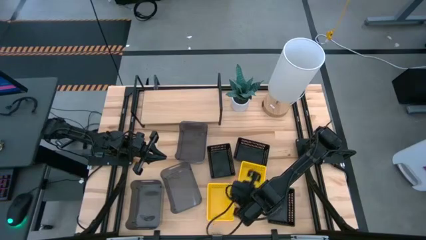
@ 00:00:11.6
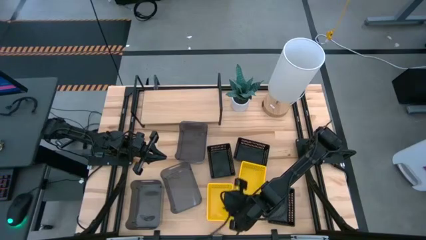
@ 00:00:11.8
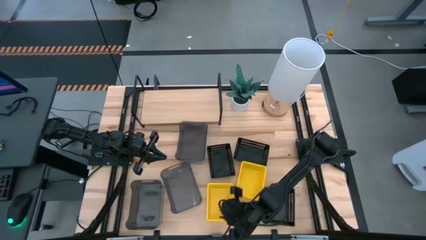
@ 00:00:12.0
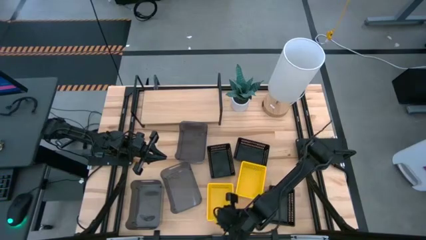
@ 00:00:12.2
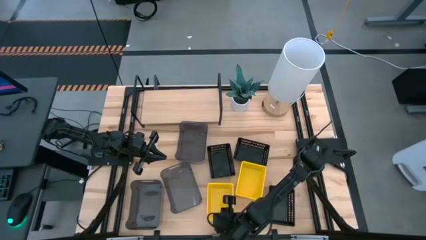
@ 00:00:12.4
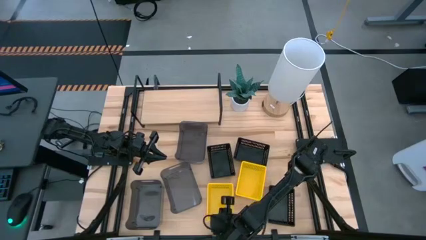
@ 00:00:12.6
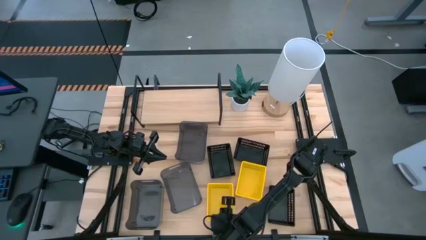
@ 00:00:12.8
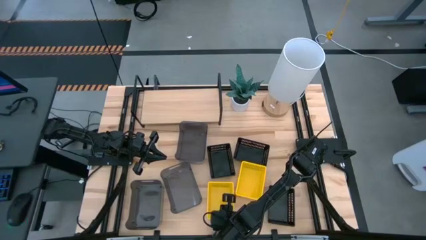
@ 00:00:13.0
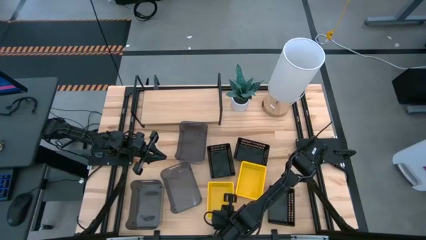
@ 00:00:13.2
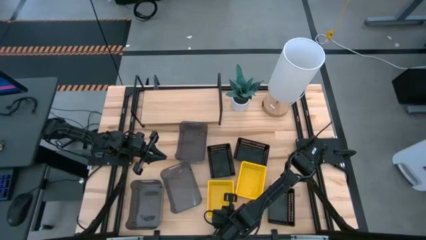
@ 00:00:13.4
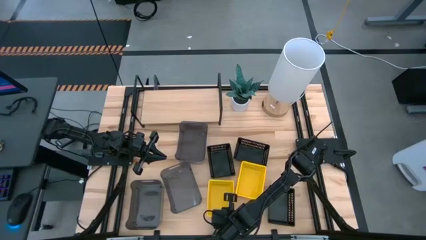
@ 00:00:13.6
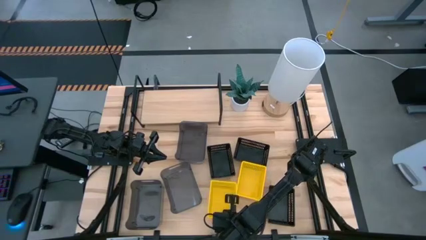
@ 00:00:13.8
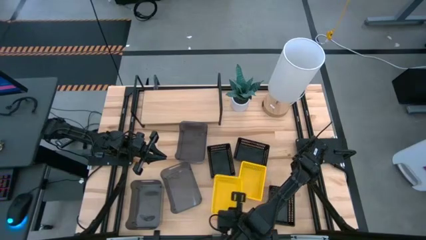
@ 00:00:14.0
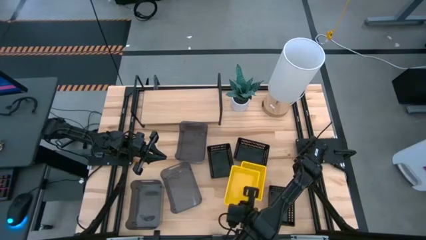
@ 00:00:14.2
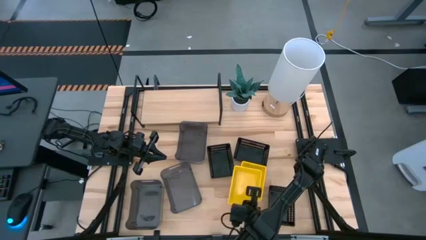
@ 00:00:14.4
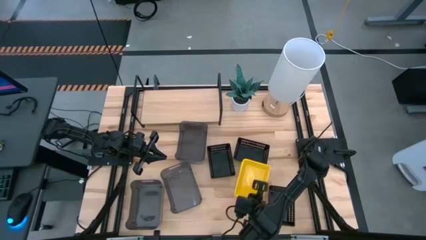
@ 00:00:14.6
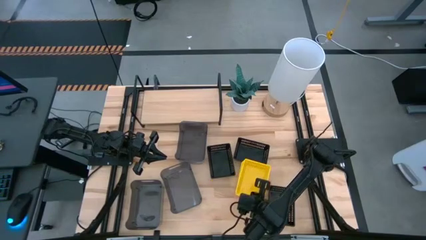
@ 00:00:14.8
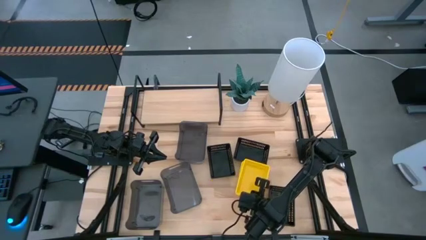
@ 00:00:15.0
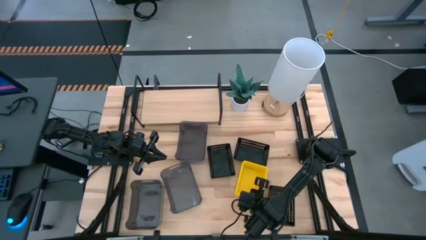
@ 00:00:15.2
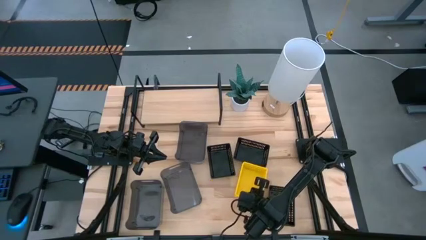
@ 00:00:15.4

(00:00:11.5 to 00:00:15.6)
Task: Stack baskets on shelf by color
Stack the left yellow bin on top of the right yellow bin

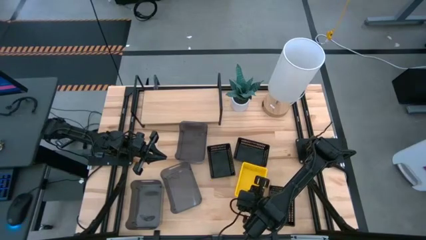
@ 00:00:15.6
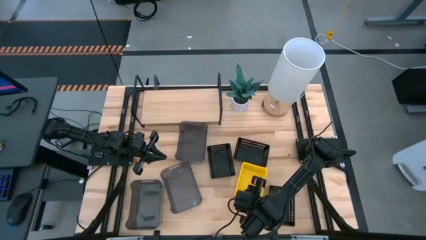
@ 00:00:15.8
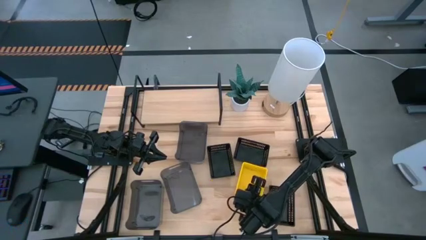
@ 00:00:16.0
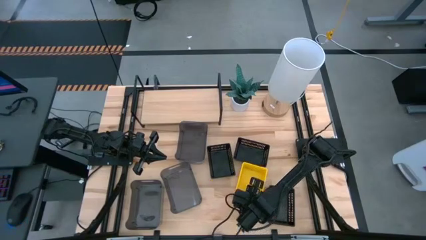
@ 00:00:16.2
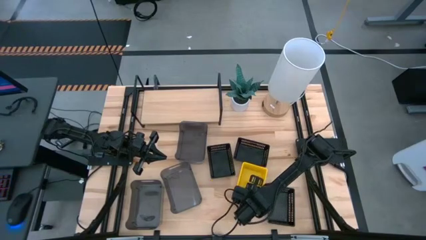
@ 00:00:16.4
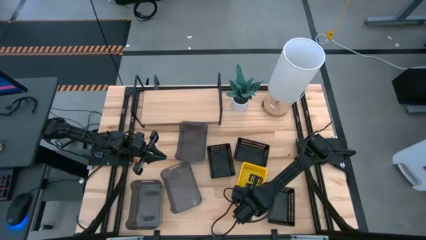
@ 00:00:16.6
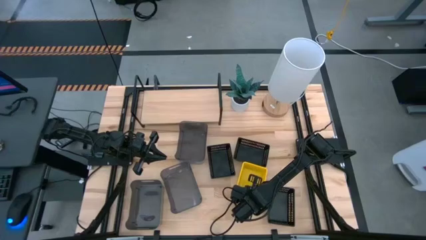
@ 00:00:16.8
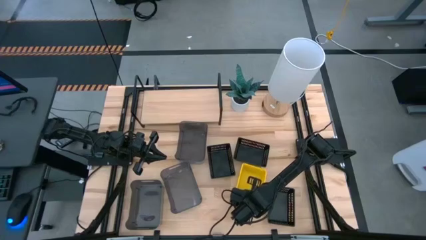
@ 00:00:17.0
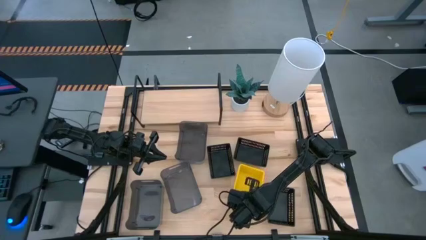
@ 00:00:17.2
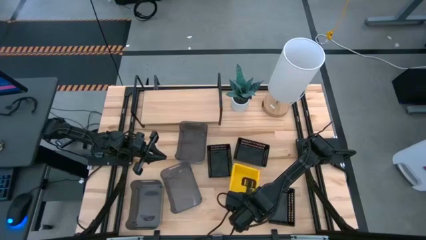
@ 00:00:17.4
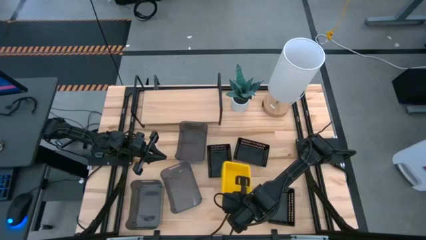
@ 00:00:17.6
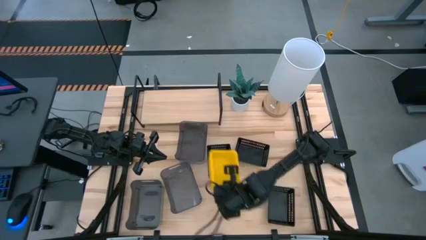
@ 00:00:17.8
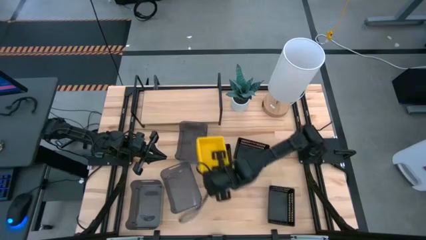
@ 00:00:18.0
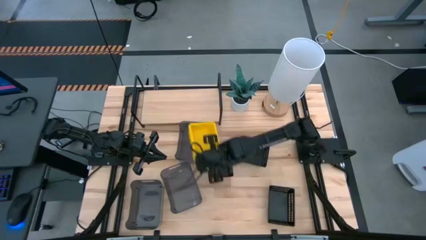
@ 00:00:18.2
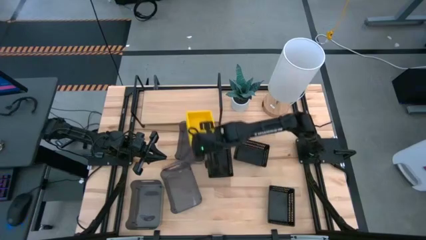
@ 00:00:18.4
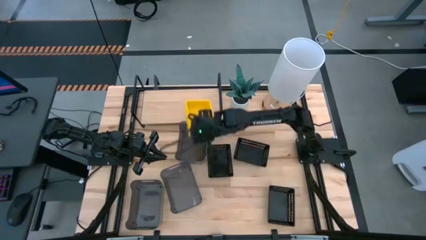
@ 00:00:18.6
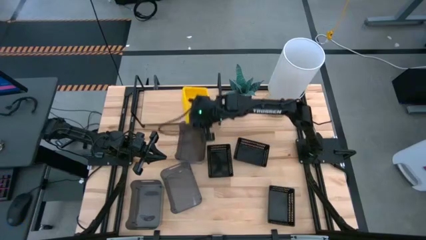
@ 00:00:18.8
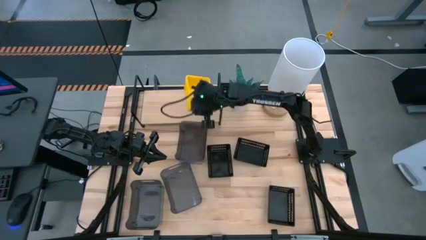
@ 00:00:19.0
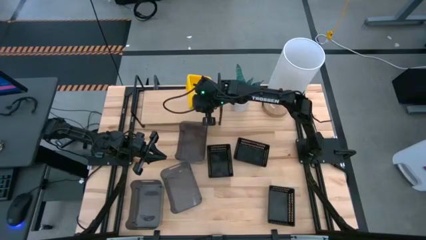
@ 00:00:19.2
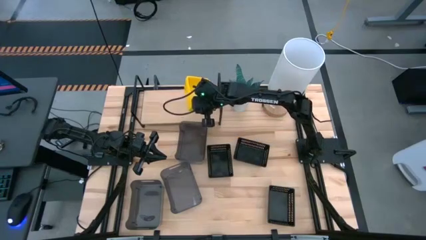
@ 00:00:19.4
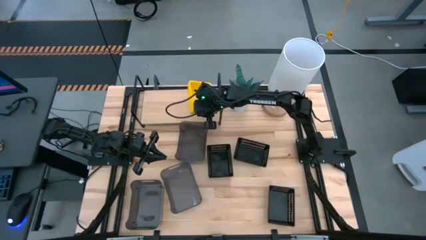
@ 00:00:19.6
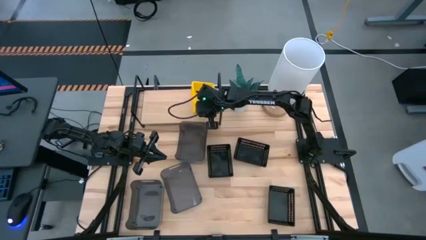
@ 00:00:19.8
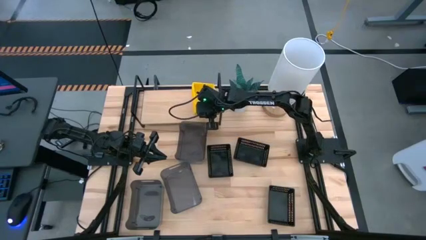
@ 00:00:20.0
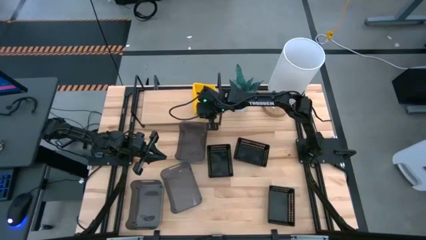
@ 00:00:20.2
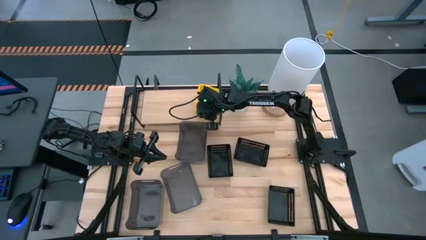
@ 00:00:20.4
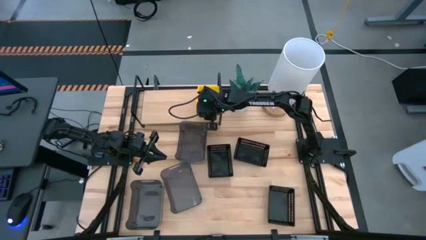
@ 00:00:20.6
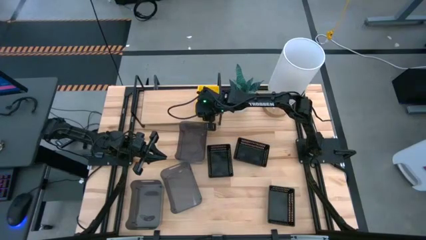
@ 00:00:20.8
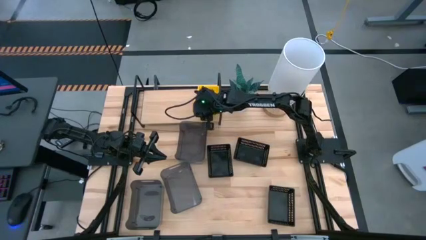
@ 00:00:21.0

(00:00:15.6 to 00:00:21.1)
Put the stacked yellow bin on the shelf

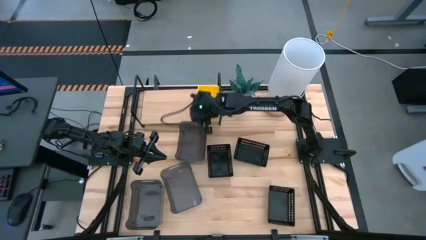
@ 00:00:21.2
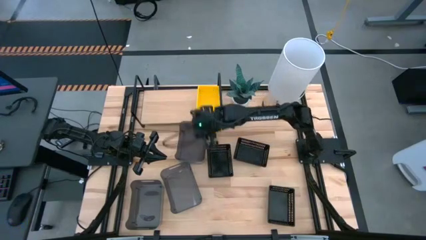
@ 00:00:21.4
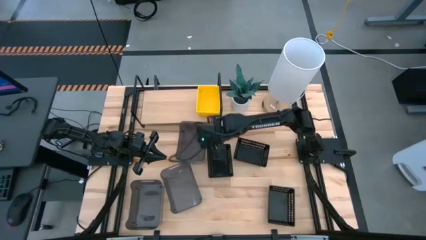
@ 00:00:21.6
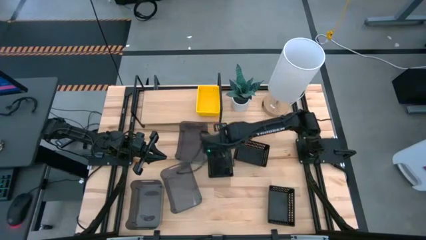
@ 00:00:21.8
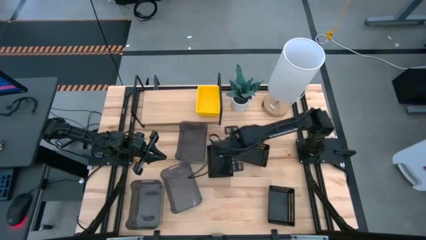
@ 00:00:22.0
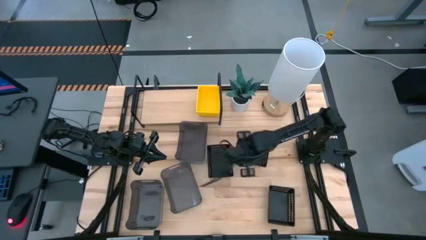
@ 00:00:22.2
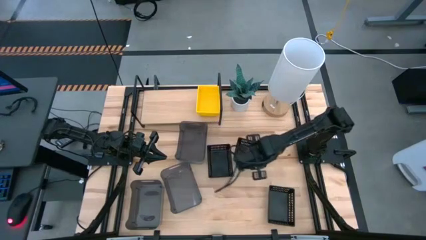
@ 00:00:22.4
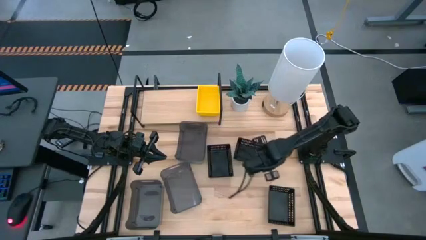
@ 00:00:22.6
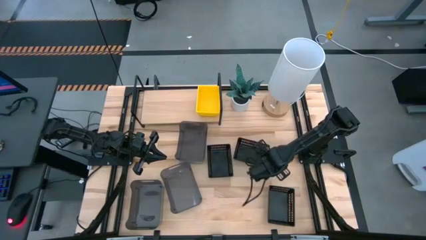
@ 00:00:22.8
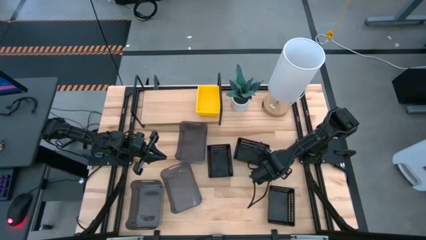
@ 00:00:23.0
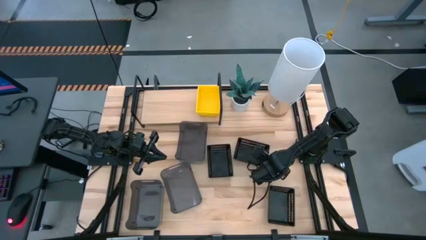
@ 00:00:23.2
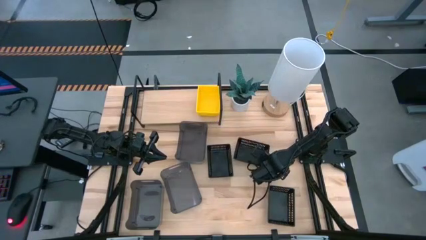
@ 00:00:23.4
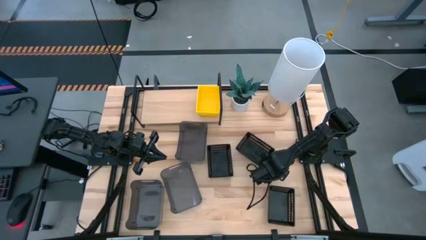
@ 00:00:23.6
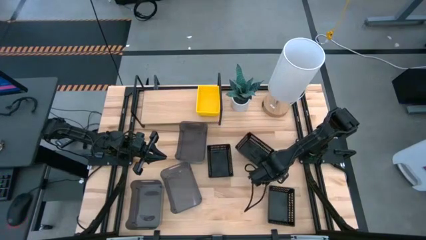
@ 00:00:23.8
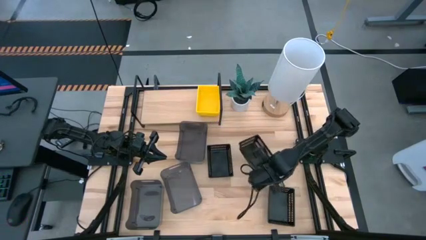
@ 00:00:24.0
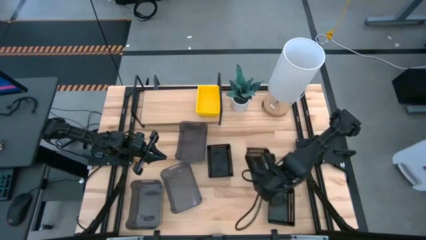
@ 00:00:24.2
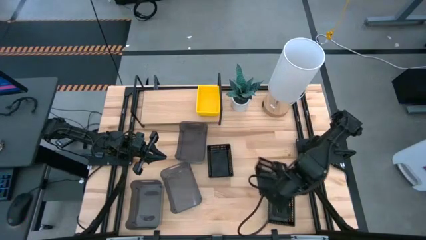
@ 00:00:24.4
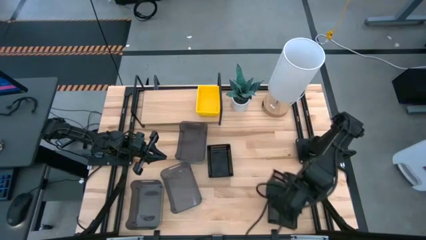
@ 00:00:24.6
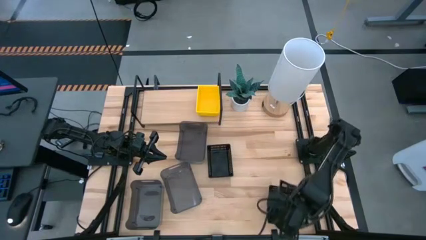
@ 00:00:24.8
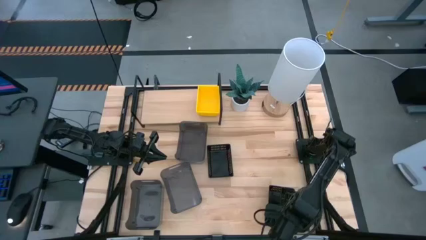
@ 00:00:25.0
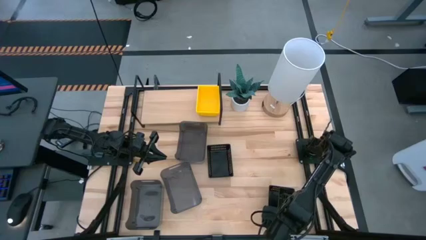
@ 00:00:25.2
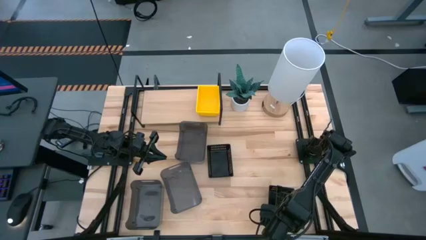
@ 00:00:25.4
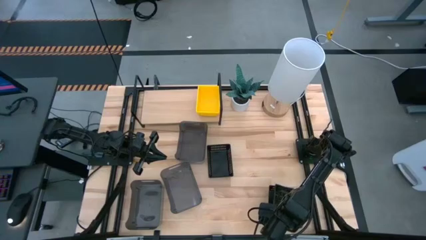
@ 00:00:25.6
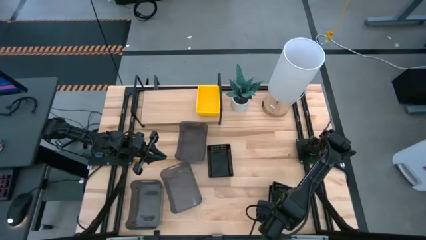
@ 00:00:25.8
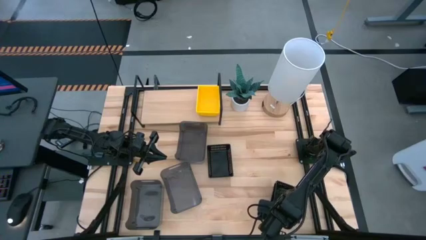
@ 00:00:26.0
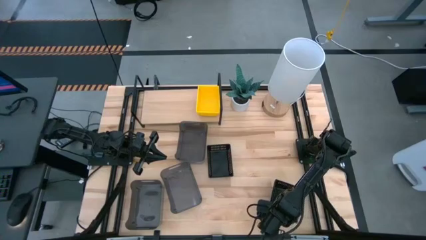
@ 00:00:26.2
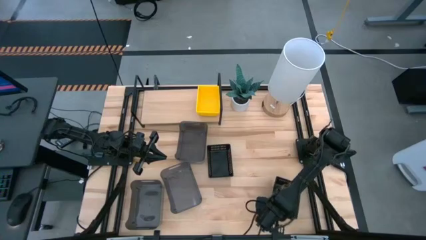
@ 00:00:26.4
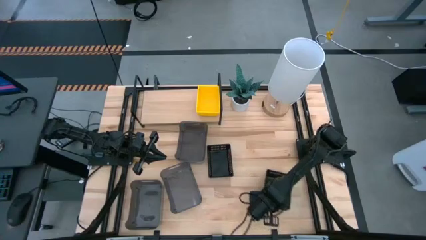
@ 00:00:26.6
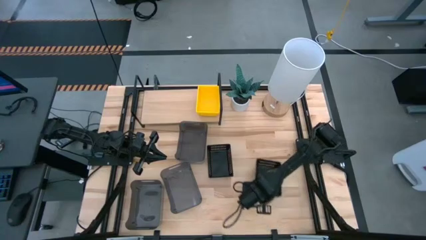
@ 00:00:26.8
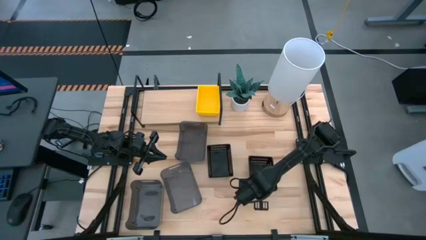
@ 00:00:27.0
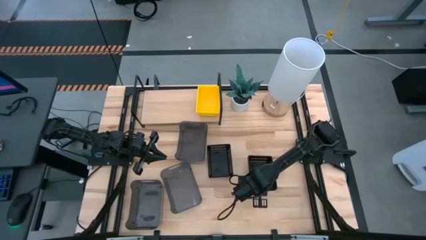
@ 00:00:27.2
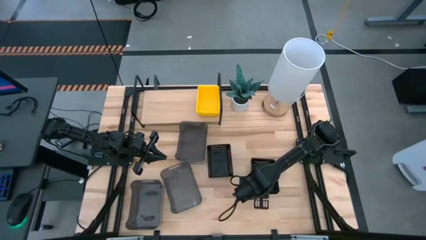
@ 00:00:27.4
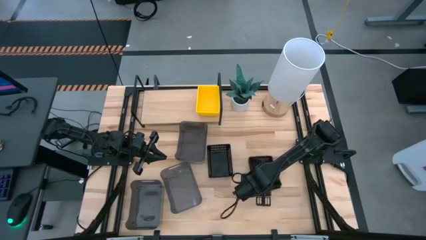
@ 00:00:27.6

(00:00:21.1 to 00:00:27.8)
Stack the top right black bin on top of the bottom black bin
